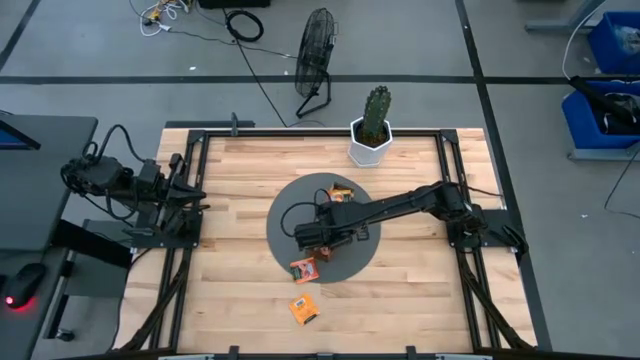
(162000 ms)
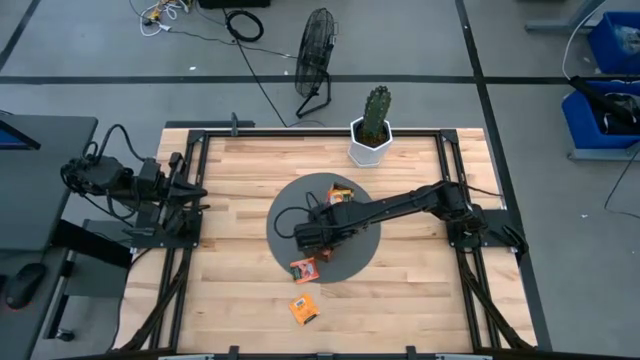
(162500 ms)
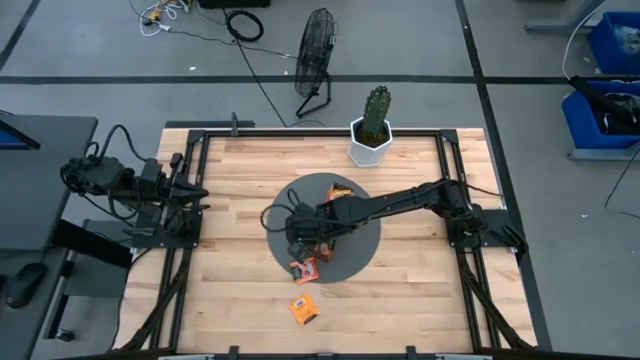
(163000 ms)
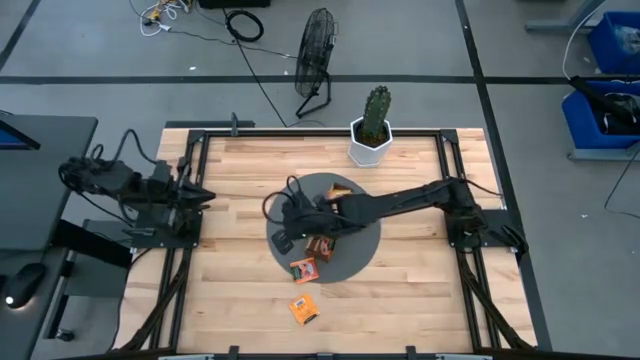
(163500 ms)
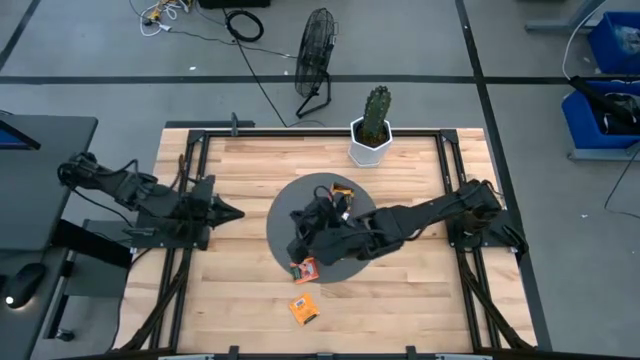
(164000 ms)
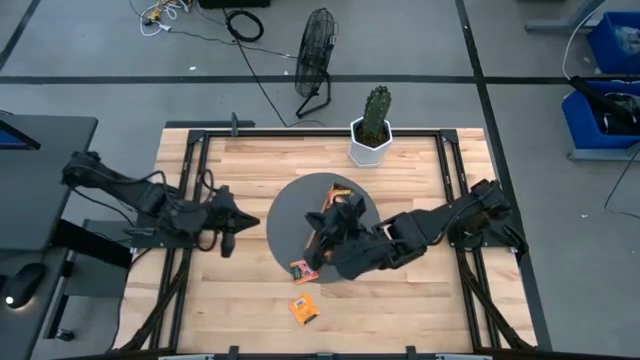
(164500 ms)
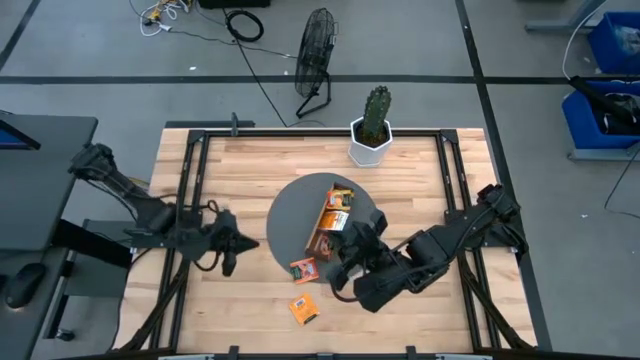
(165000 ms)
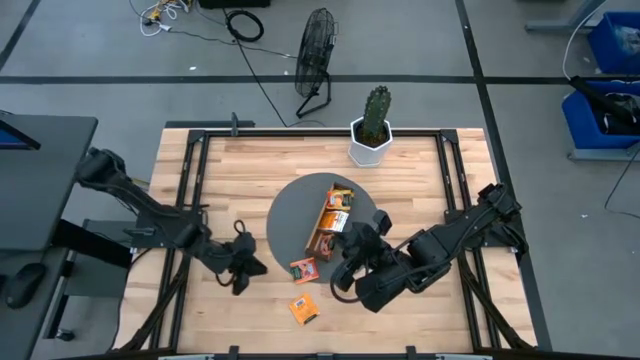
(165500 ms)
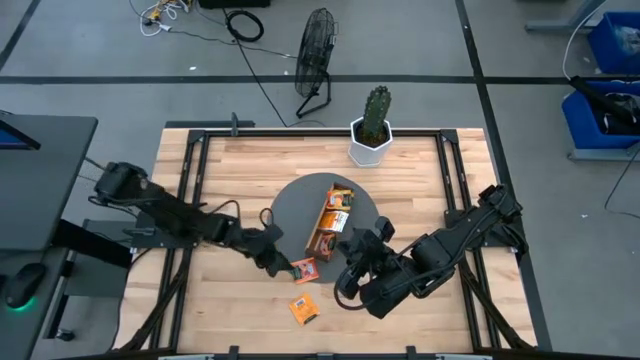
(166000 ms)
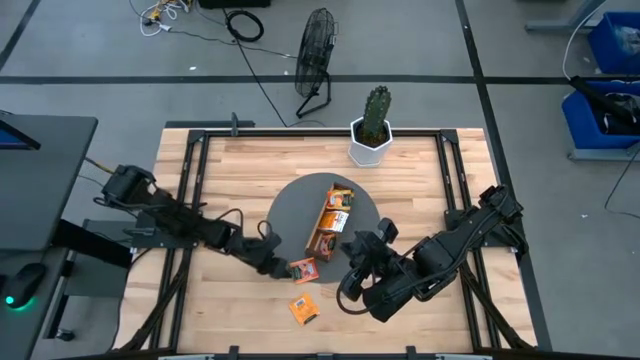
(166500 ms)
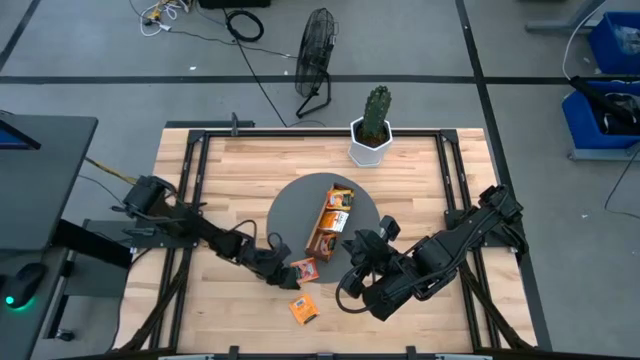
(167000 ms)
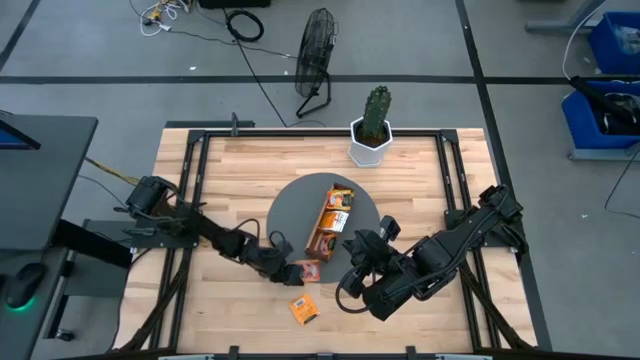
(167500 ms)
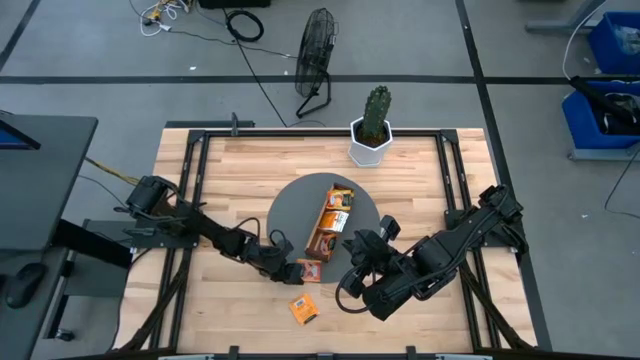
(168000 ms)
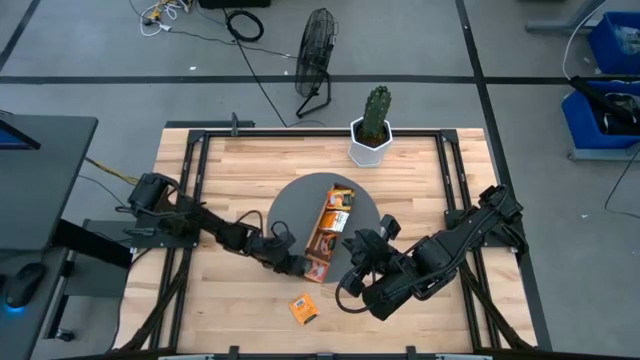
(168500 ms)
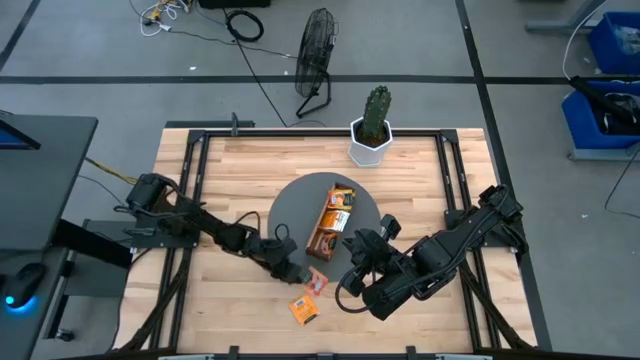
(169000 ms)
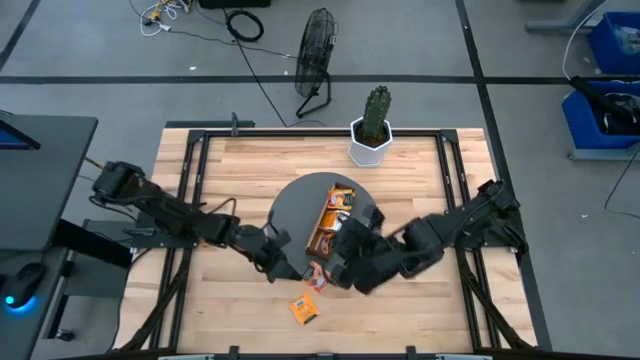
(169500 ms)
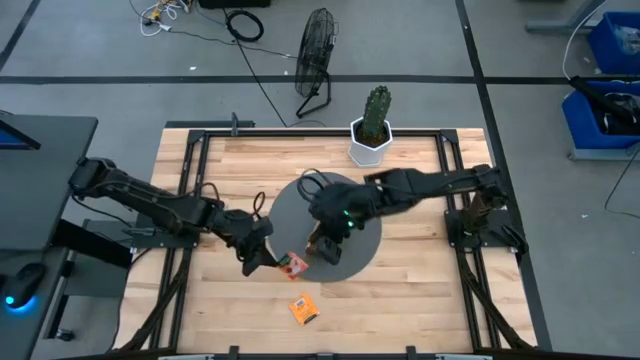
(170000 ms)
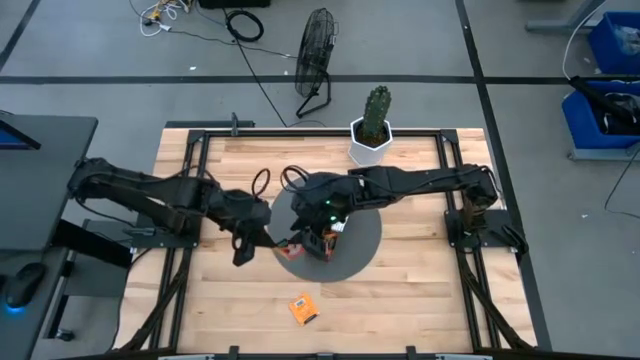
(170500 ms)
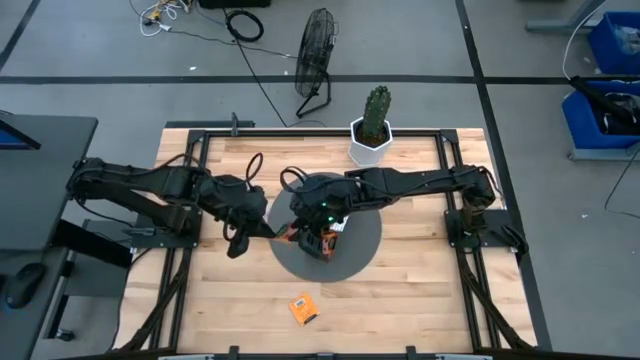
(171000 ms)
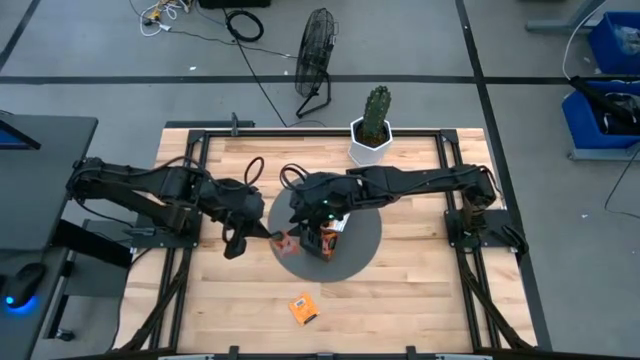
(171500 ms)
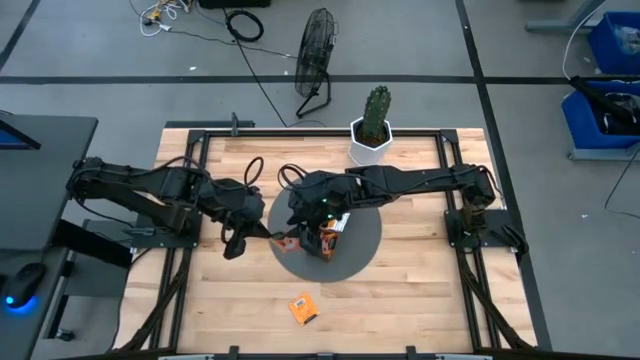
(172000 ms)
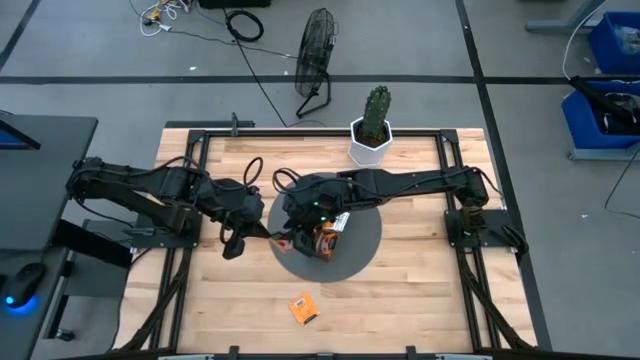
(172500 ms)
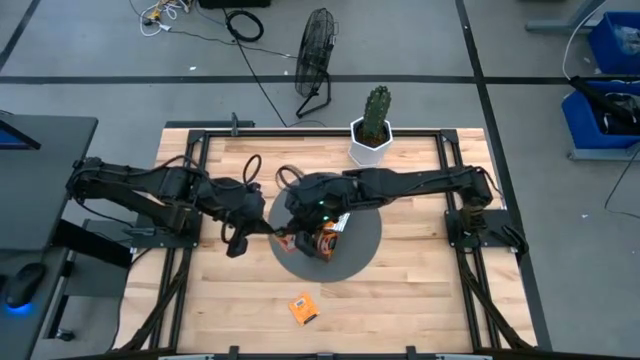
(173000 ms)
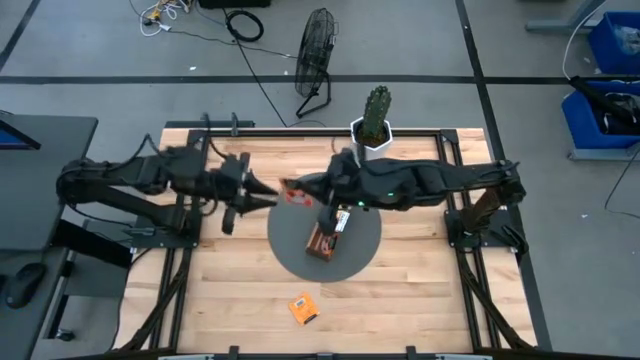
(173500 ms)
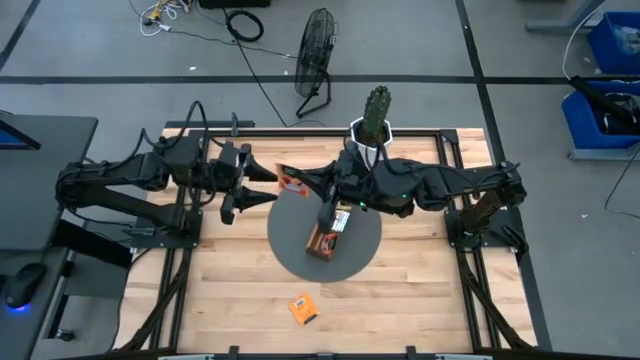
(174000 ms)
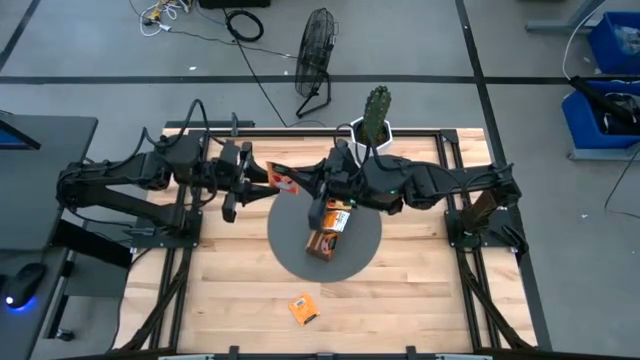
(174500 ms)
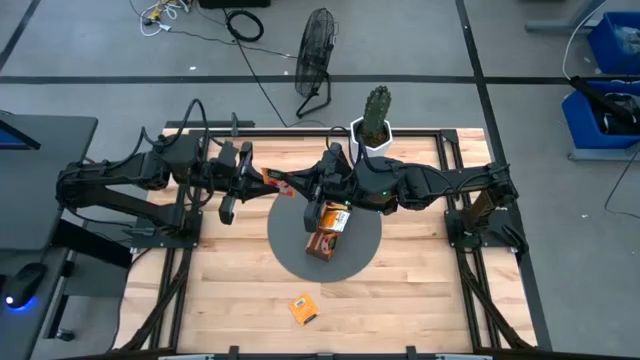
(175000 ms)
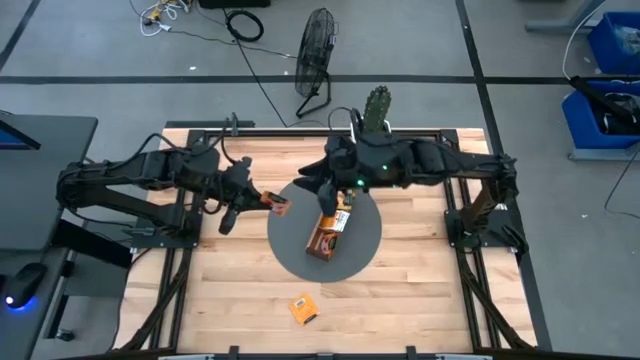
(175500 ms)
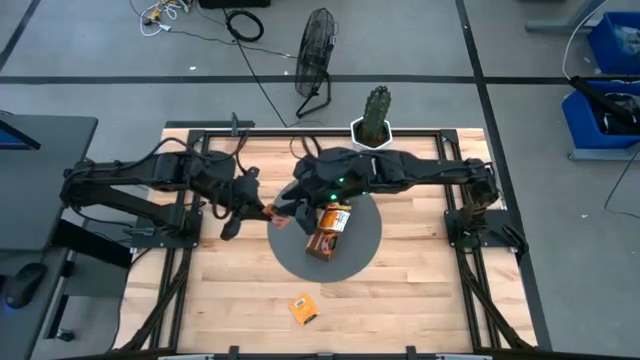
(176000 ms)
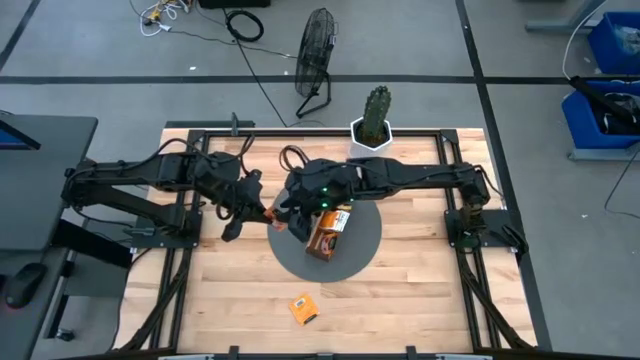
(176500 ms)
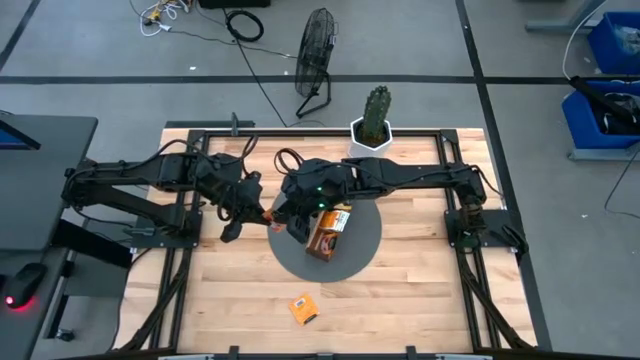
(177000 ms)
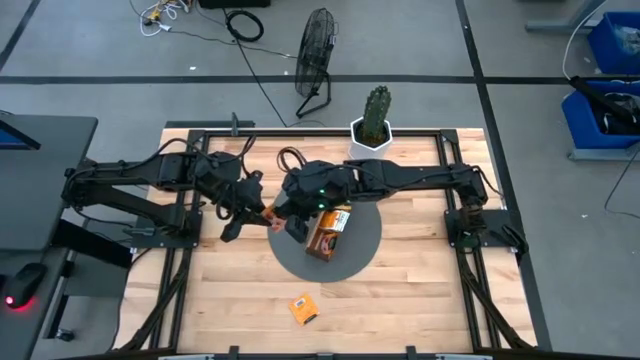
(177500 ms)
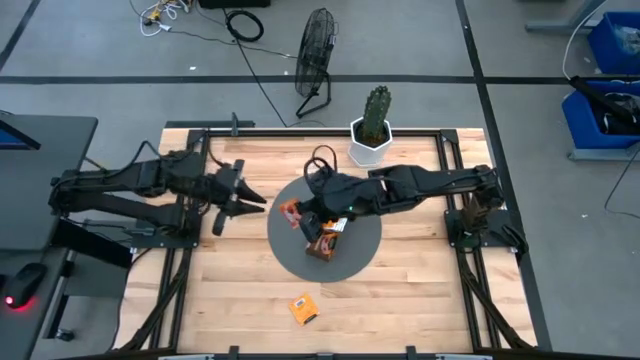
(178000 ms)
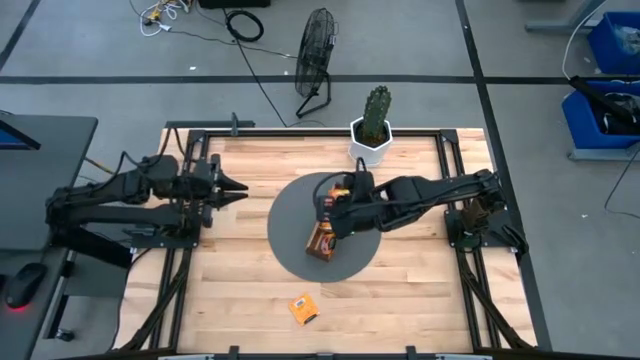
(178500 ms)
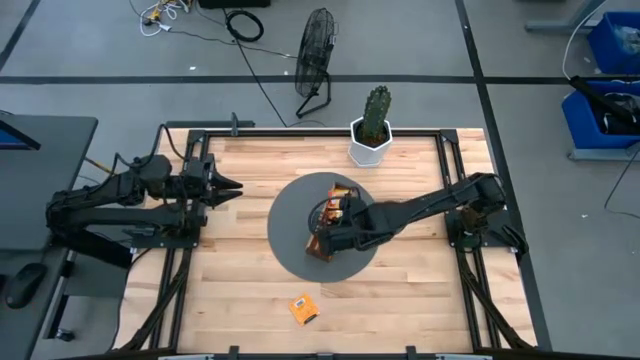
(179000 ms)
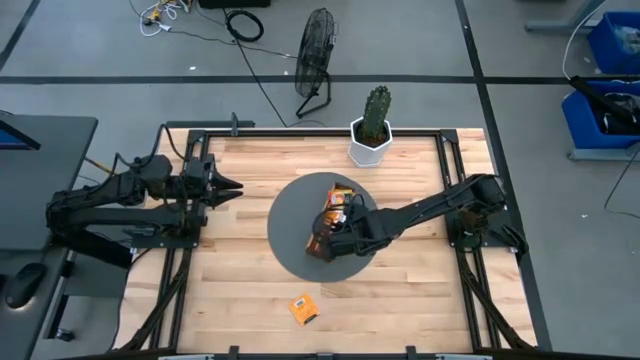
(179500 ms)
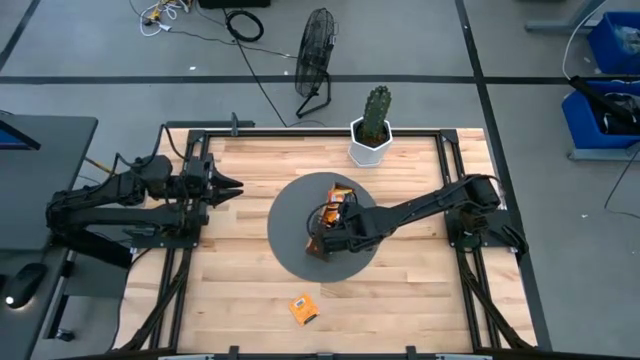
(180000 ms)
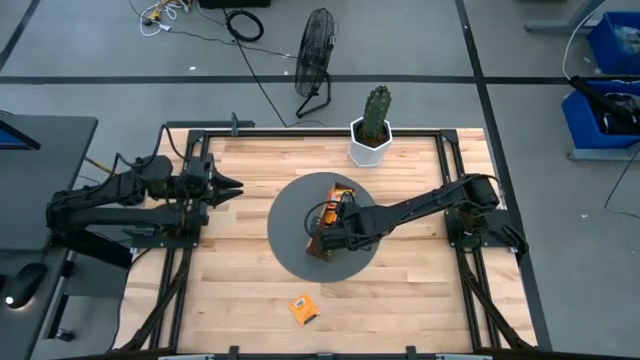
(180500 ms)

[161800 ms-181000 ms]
Task: Pick & Place Tea
Put the red tea bag into the bottom section of the wooden organizer

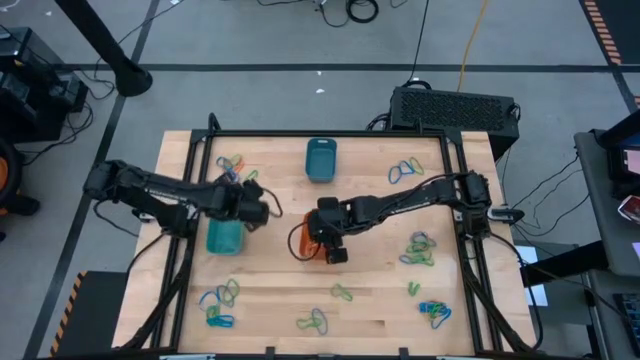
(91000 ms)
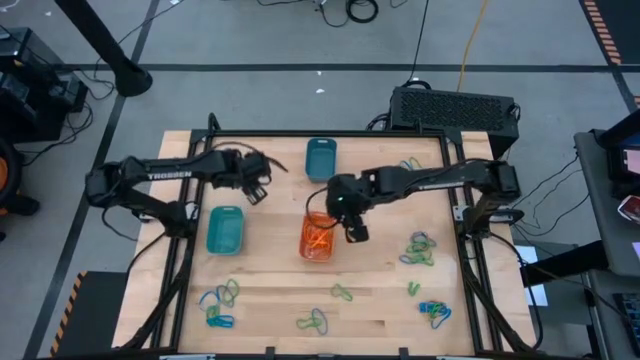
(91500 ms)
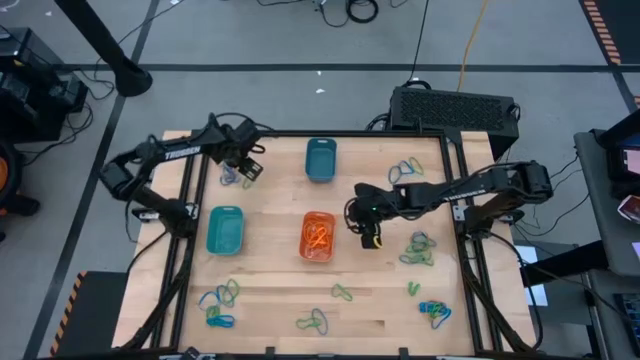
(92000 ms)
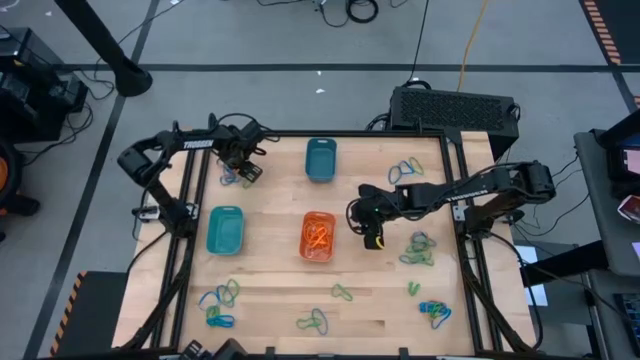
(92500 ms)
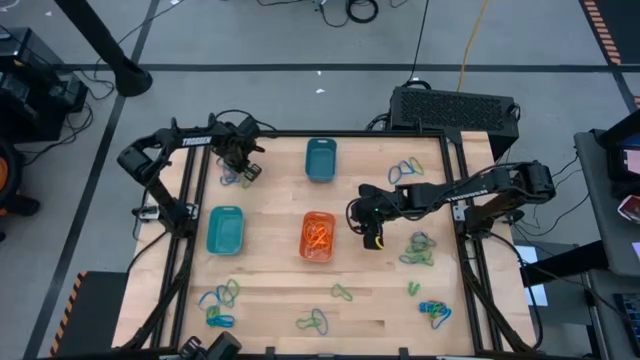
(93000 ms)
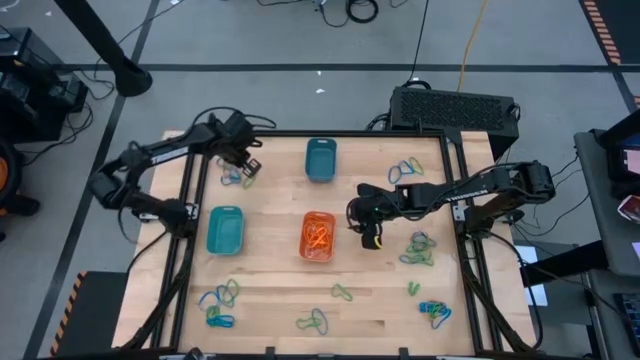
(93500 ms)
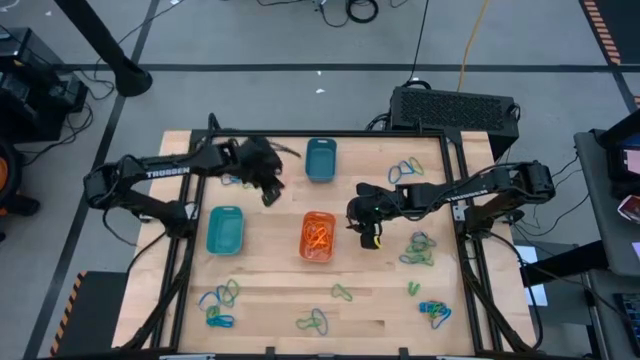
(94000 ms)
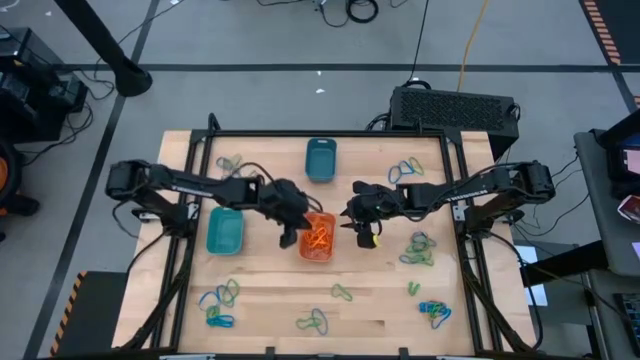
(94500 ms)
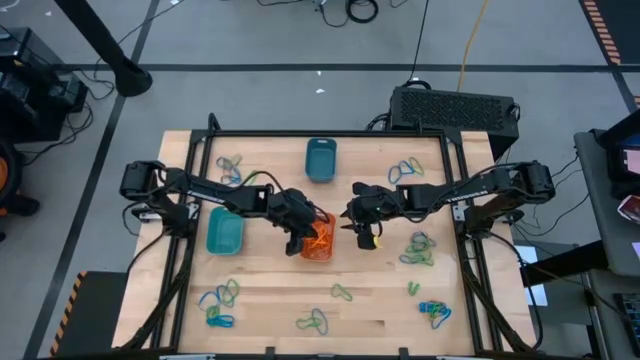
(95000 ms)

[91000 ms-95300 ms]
Task: Sort rubber bands into baskets
Put the orange rubber band into the orange bin
